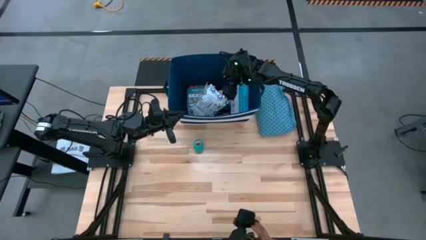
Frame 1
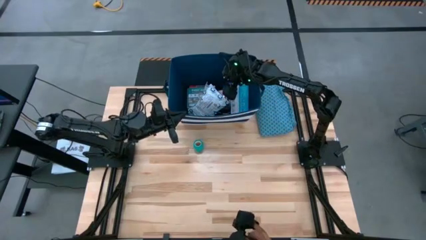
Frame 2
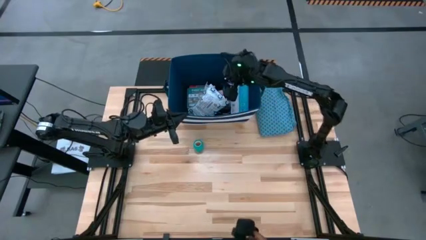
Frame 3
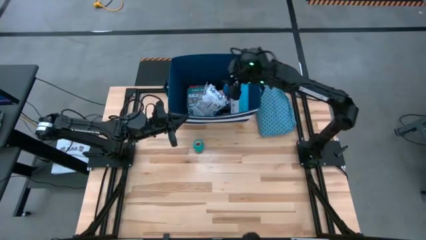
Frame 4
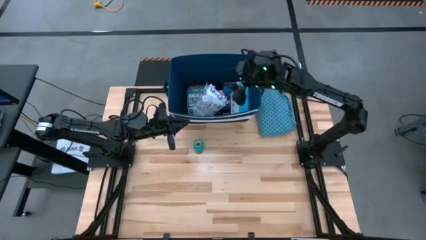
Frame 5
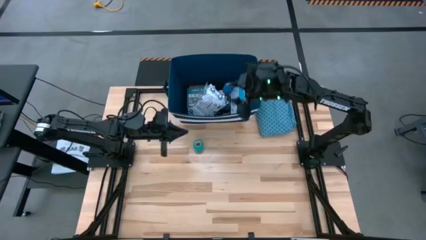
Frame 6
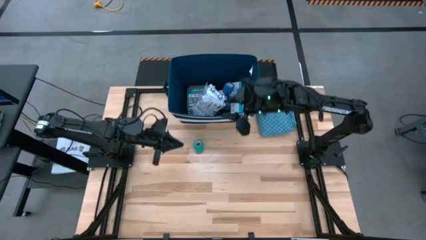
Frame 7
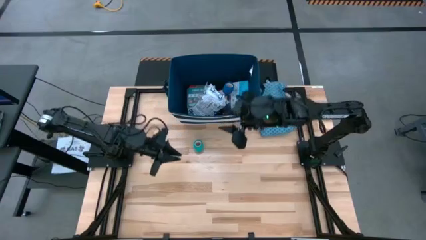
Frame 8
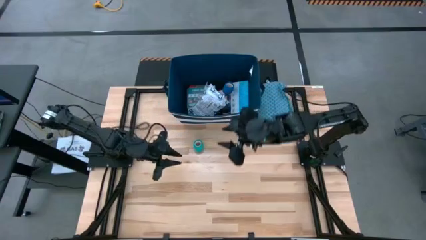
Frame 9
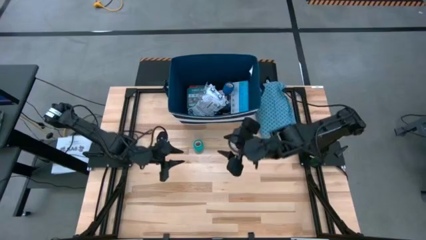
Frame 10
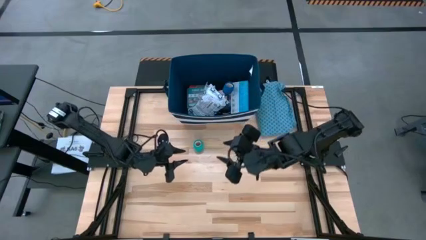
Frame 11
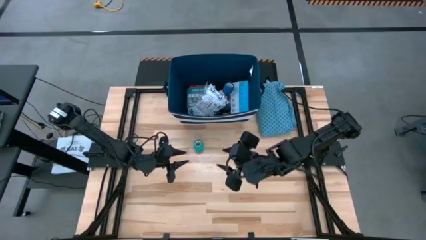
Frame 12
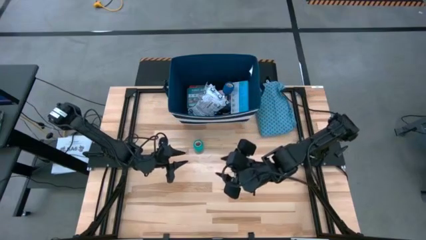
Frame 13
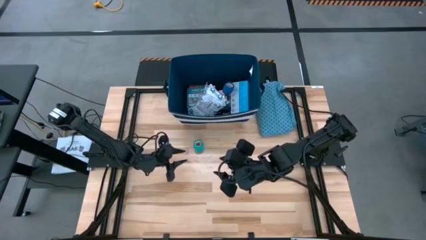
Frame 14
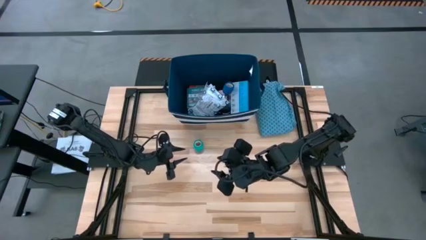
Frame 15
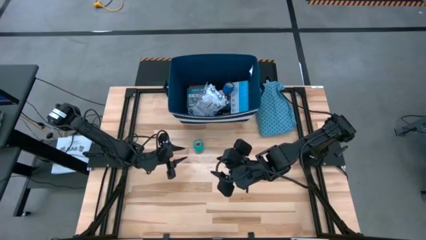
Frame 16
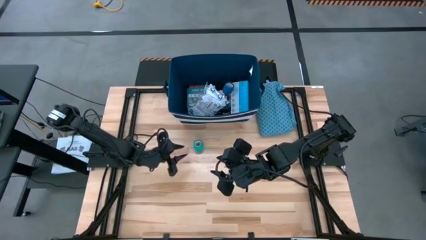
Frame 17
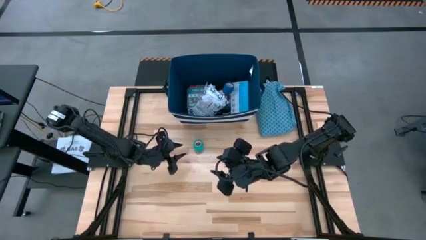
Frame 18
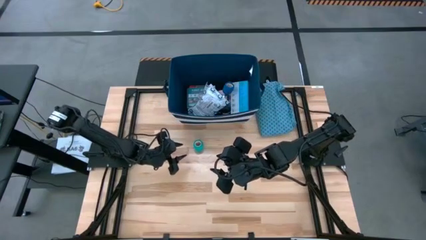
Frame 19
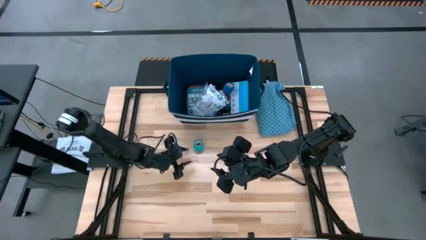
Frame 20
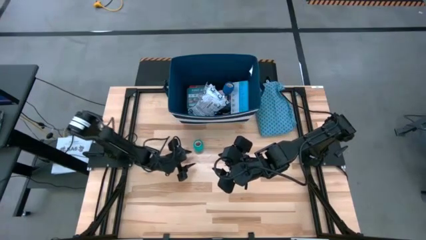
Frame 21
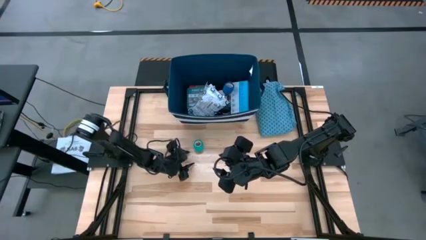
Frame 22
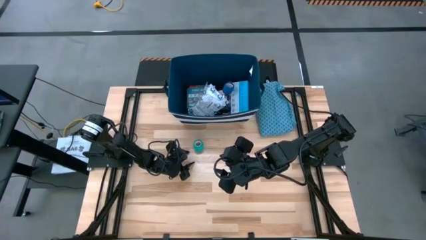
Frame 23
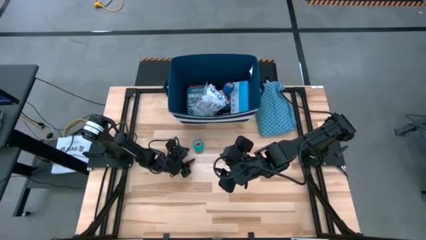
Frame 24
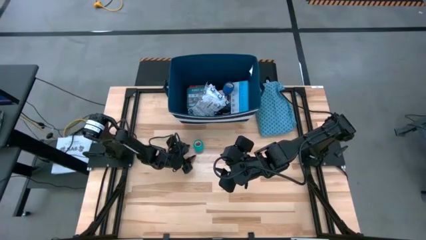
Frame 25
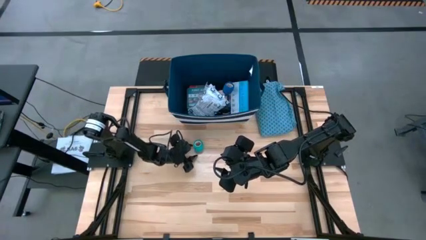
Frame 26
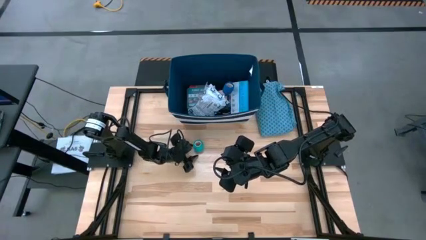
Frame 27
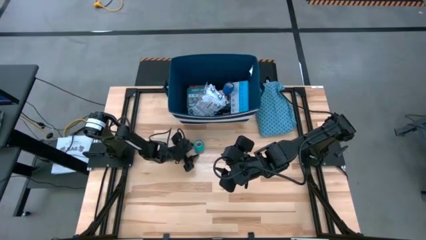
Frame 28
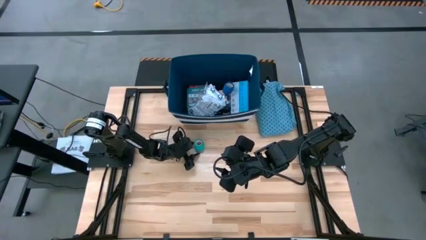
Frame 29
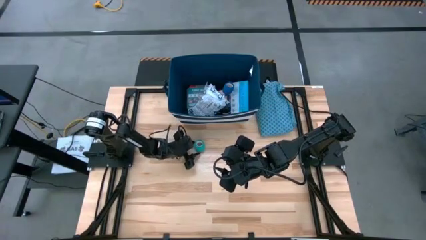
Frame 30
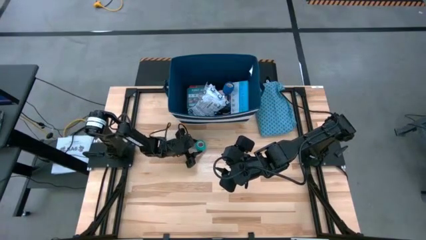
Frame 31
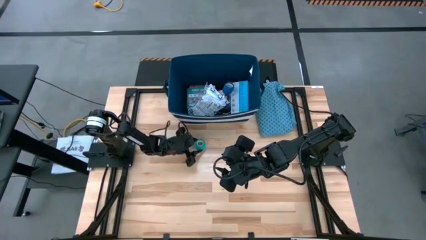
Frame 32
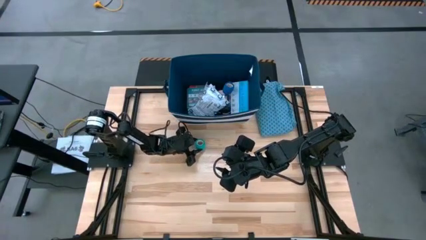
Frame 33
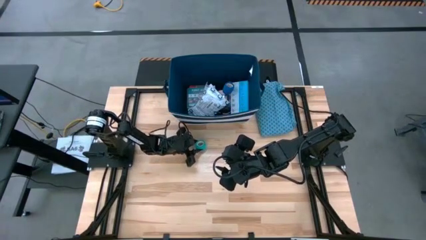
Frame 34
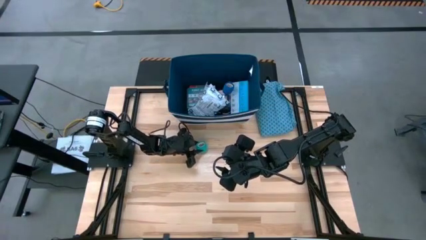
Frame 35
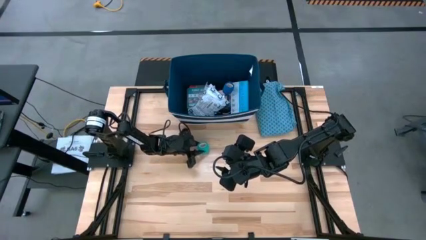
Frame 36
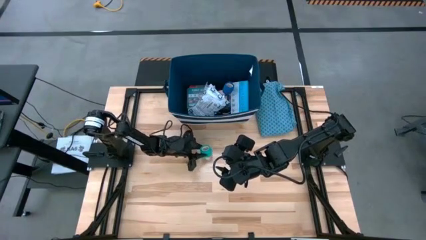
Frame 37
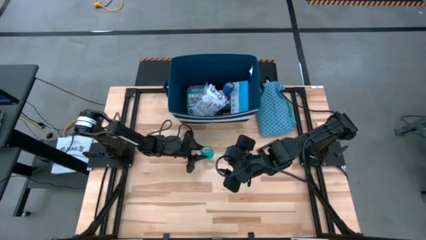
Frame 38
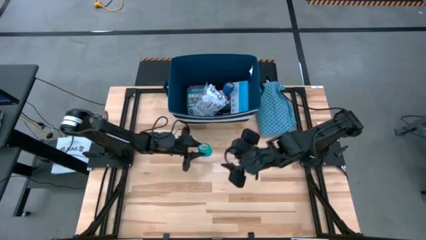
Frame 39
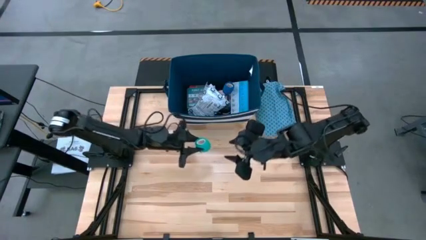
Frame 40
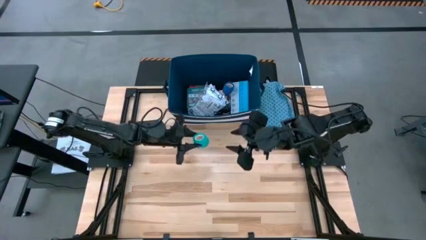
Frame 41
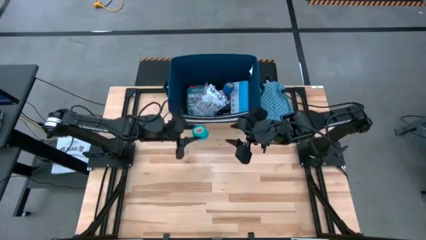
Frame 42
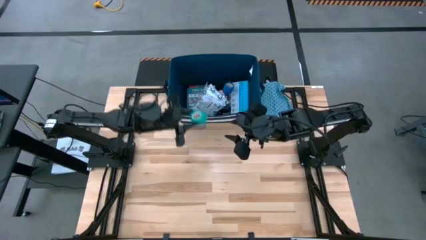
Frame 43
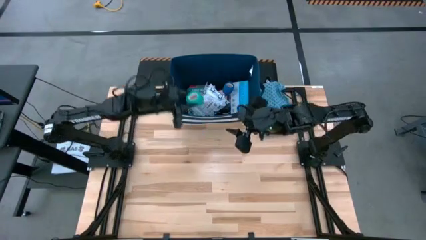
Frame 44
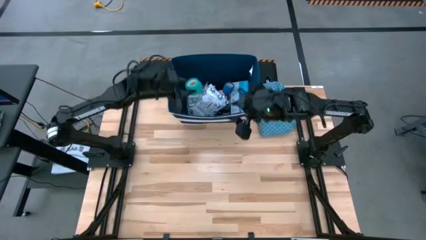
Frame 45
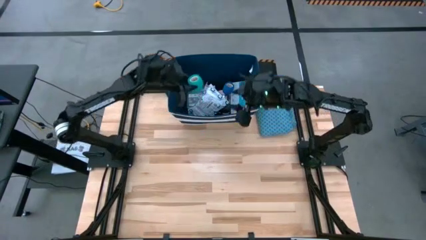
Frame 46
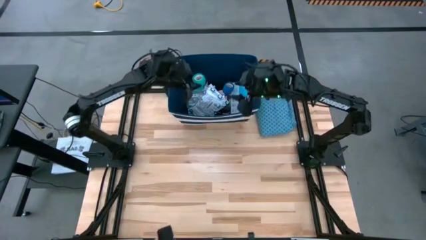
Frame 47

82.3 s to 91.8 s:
Task: Pick & place medical supplies in basket/bin
Put the green rolled bandage into the bin

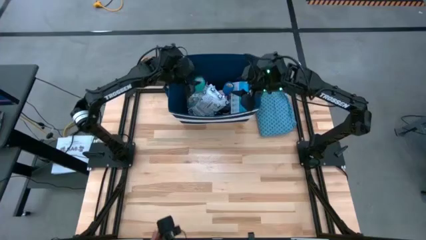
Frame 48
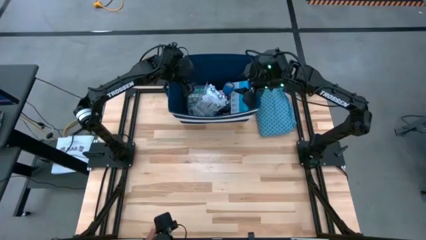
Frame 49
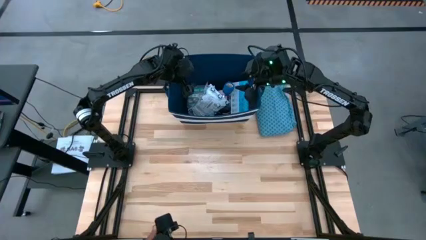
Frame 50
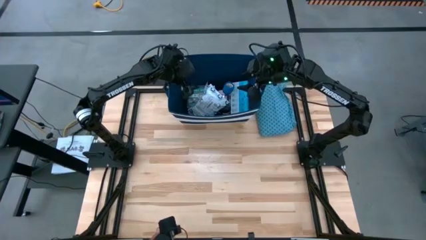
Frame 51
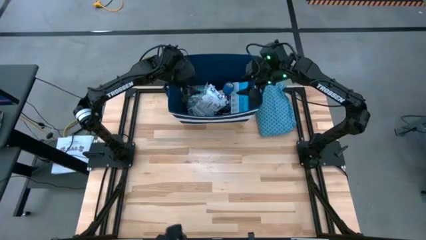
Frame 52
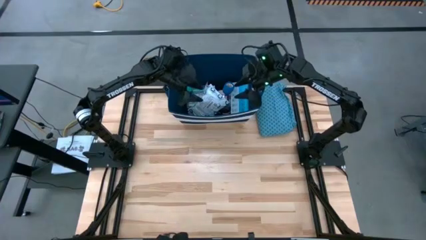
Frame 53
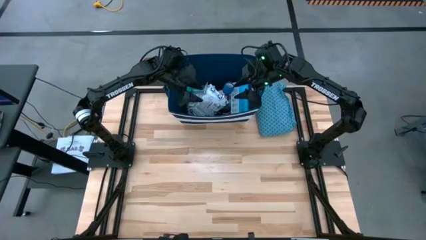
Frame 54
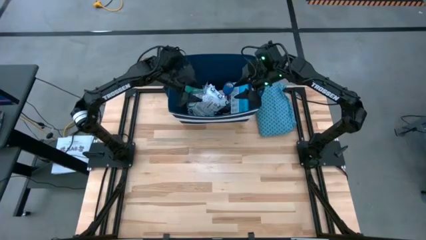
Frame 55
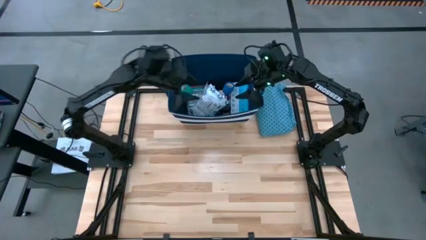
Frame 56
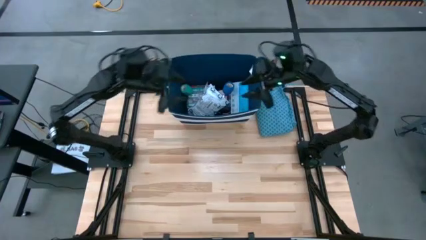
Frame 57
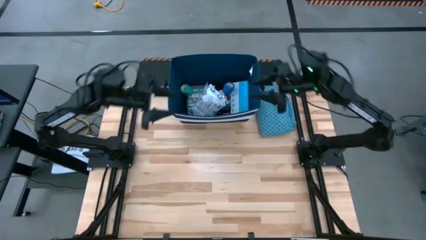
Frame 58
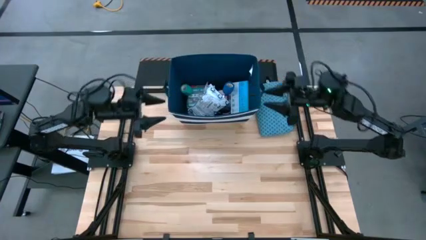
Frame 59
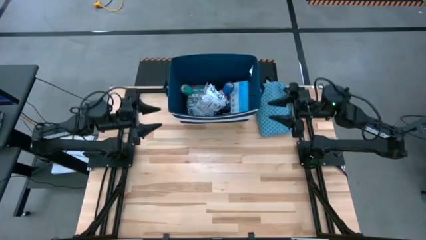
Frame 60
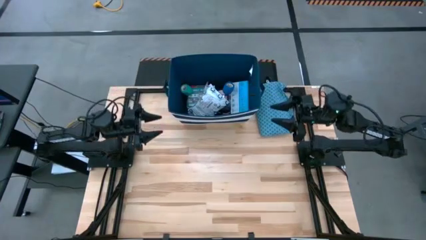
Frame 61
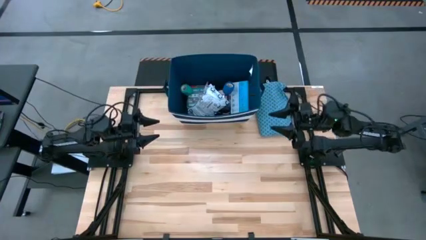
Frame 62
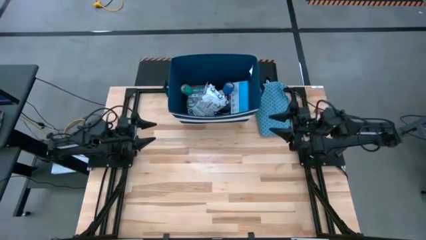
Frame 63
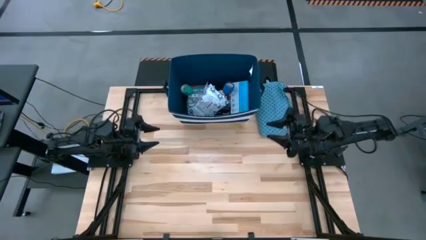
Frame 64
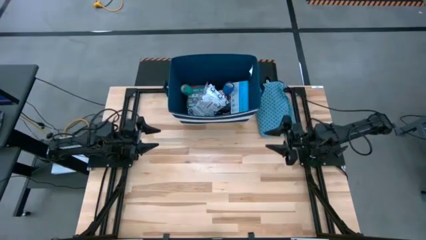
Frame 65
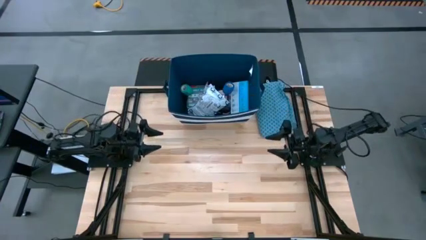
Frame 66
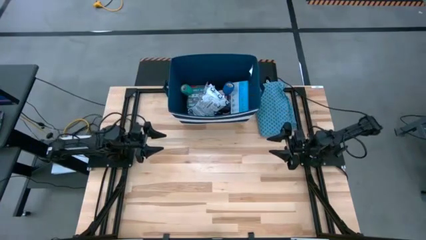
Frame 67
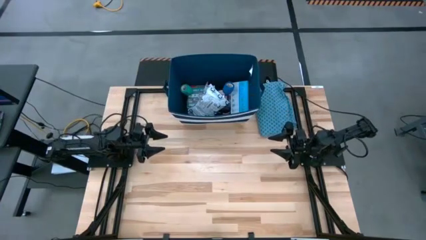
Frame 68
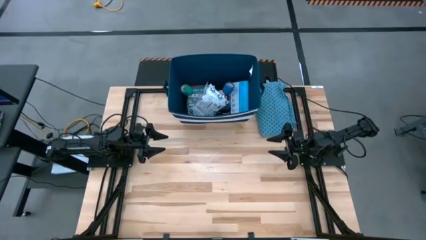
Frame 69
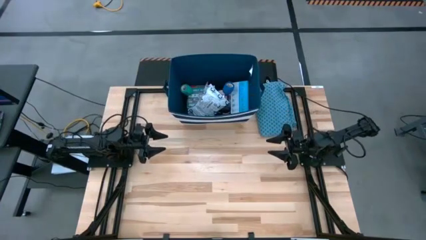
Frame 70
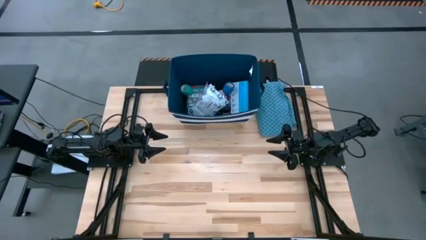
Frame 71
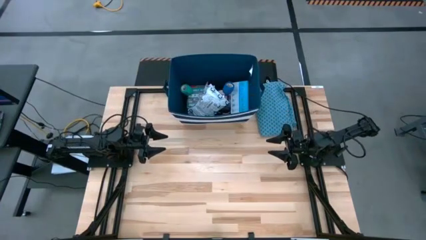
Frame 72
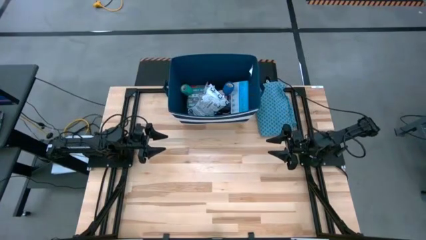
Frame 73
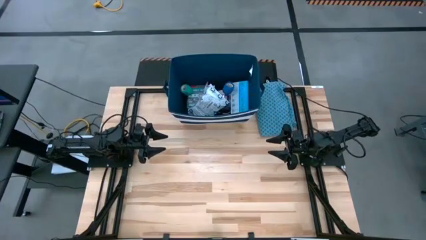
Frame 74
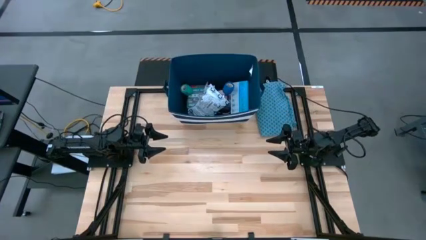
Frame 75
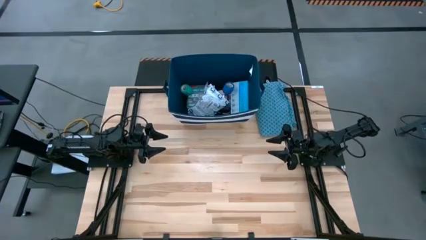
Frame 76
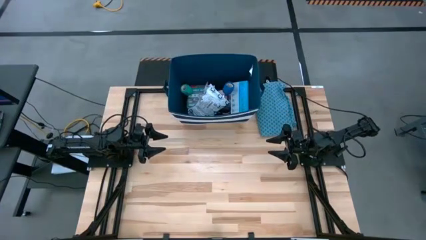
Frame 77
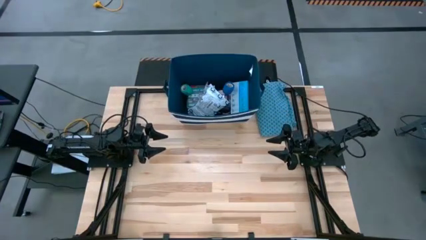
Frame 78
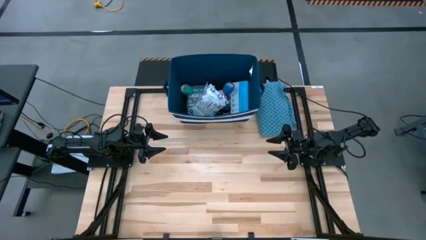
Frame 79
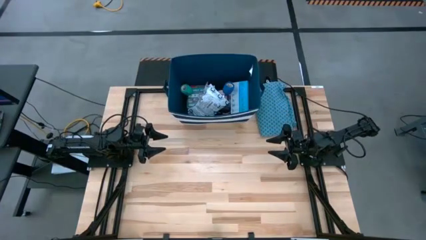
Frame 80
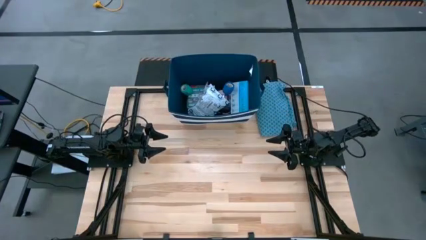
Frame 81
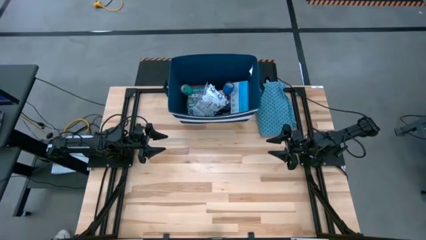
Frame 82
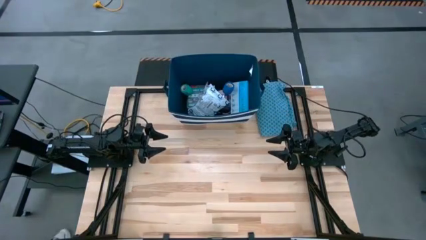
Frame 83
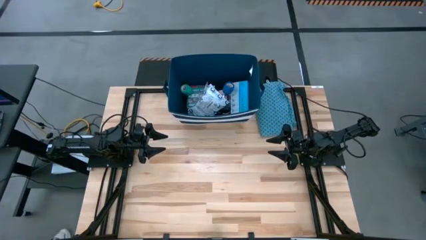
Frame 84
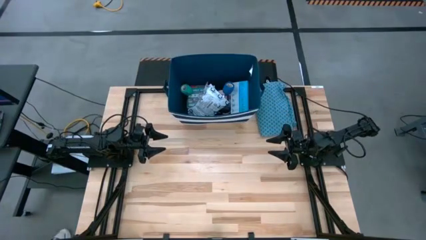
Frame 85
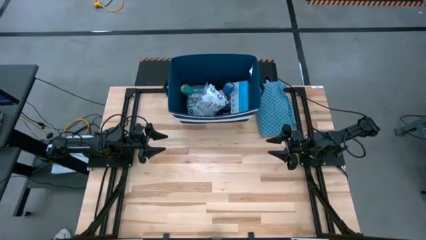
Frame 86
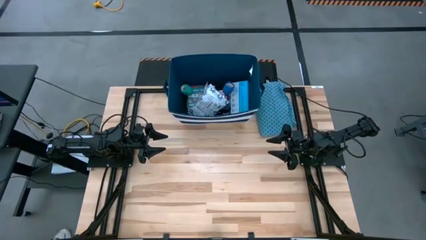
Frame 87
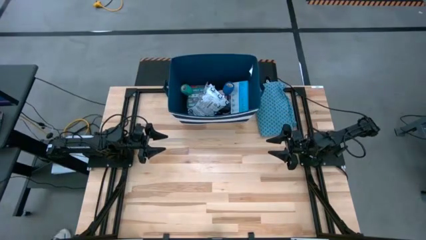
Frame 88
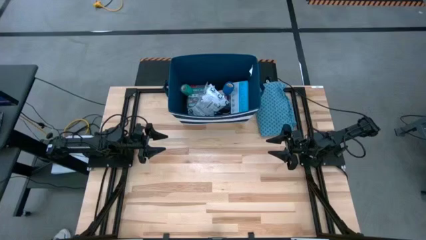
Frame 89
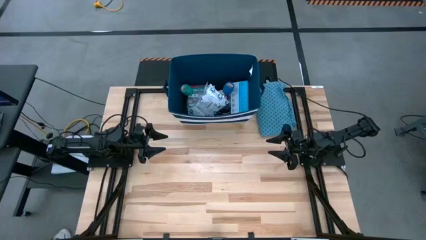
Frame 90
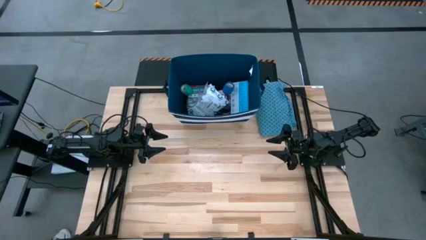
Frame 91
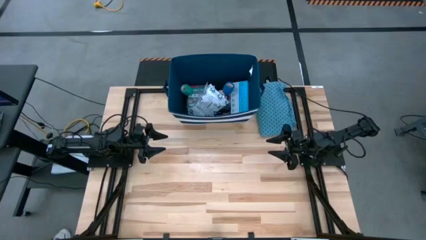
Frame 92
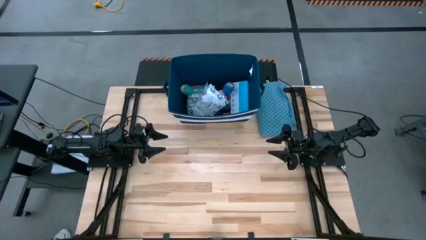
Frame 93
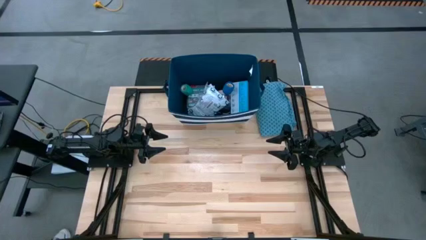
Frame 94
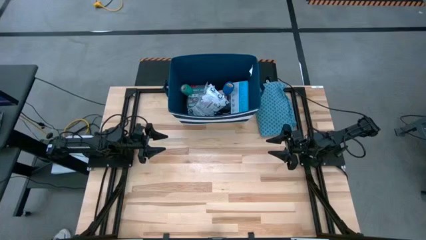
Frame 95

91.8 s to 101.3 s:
Return to Home Position
